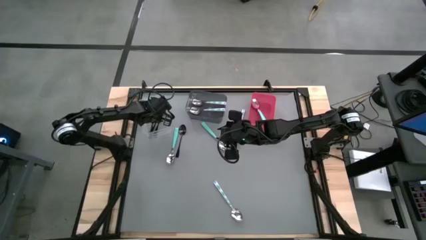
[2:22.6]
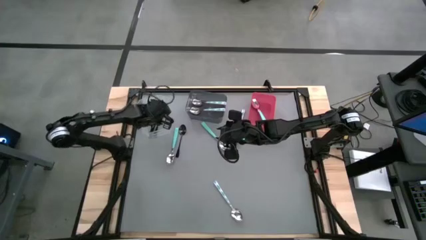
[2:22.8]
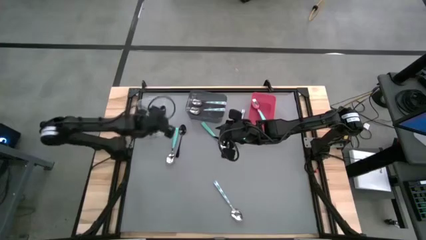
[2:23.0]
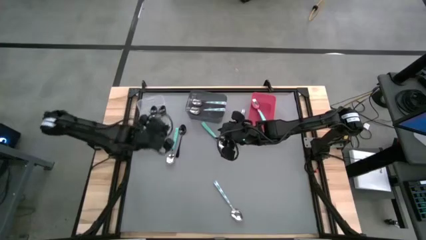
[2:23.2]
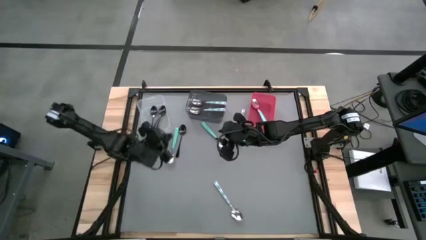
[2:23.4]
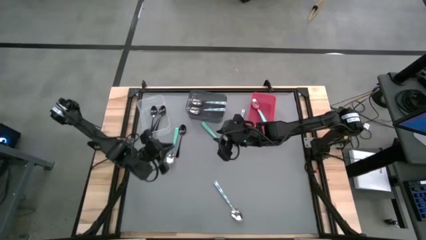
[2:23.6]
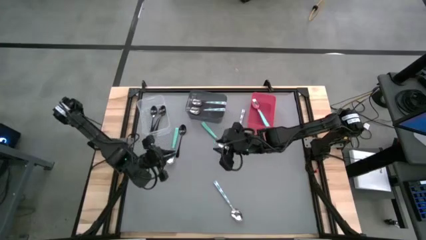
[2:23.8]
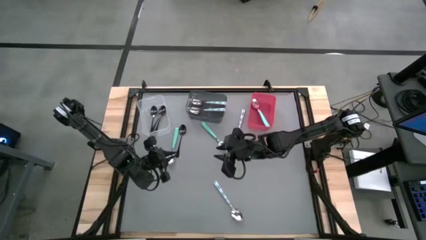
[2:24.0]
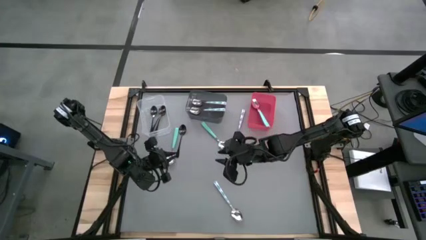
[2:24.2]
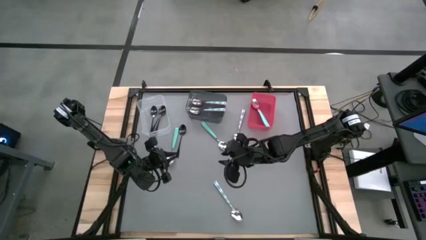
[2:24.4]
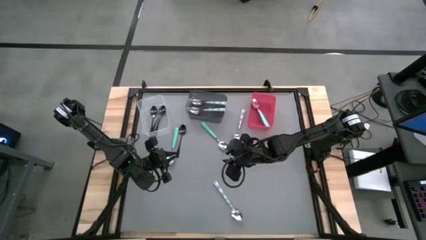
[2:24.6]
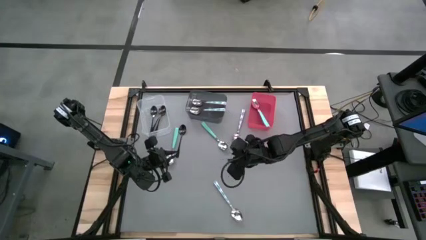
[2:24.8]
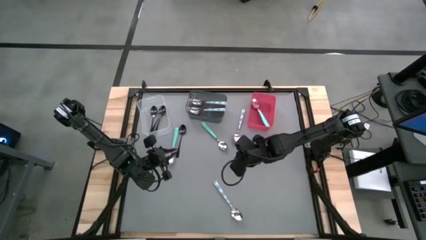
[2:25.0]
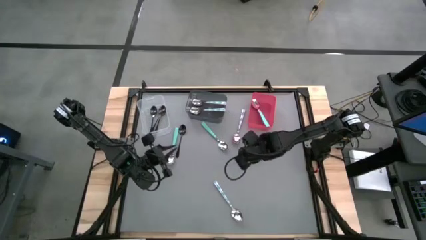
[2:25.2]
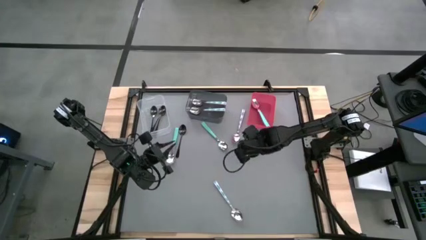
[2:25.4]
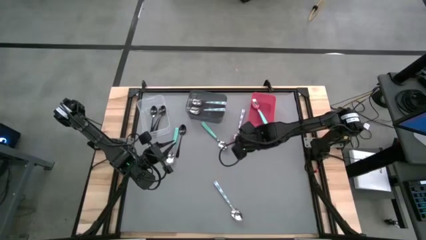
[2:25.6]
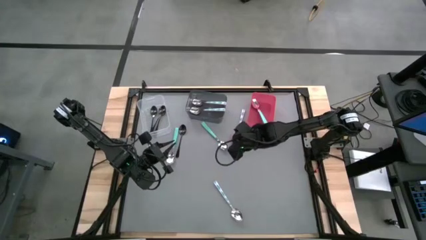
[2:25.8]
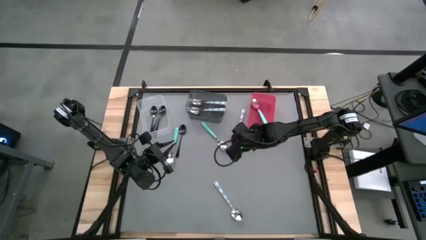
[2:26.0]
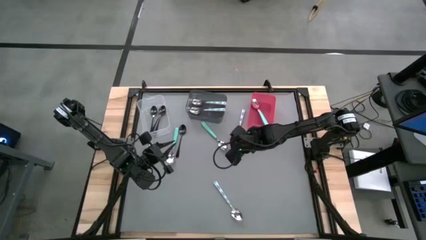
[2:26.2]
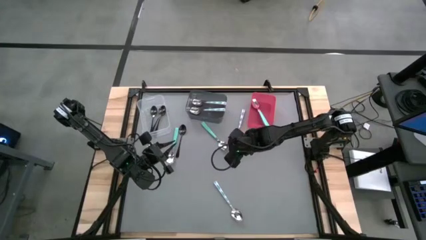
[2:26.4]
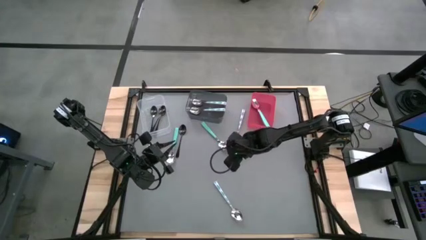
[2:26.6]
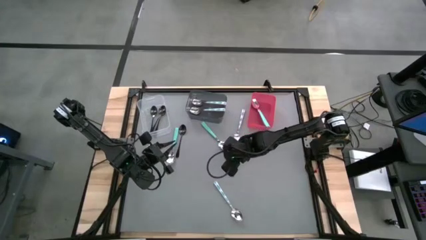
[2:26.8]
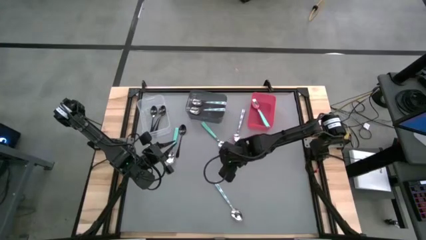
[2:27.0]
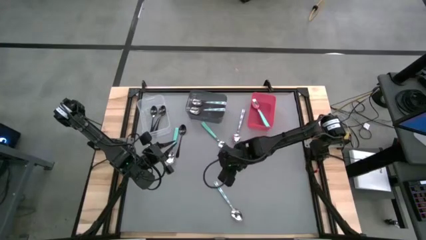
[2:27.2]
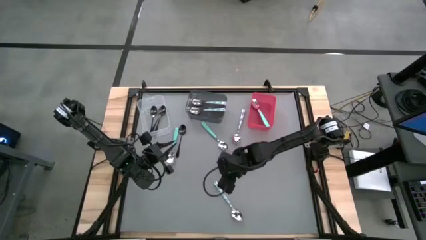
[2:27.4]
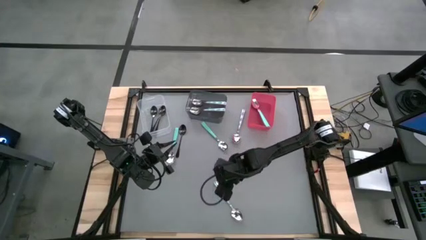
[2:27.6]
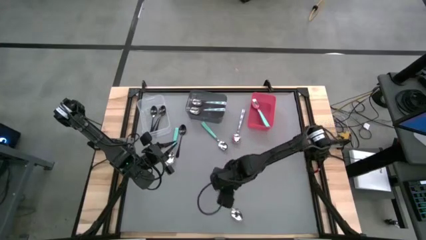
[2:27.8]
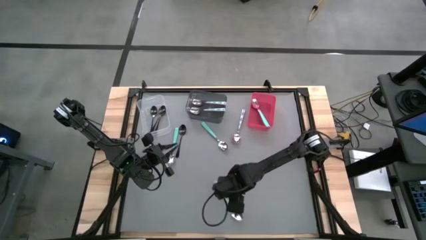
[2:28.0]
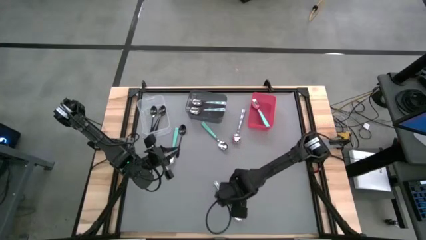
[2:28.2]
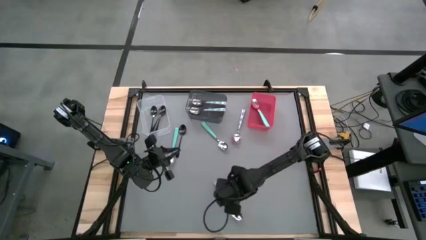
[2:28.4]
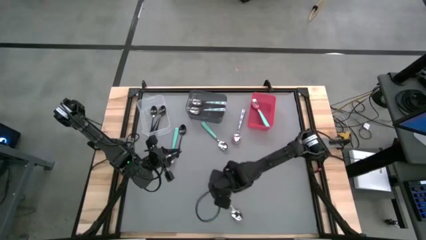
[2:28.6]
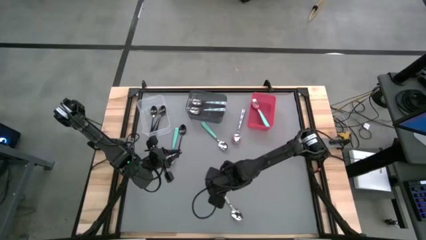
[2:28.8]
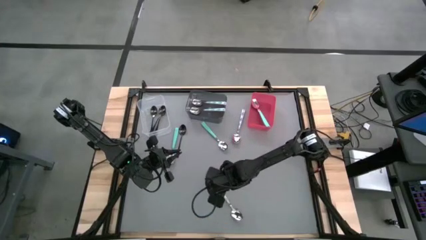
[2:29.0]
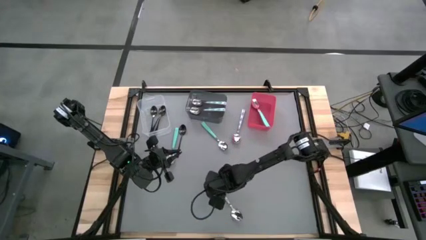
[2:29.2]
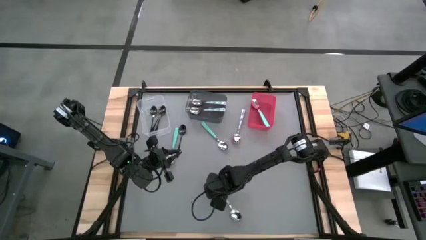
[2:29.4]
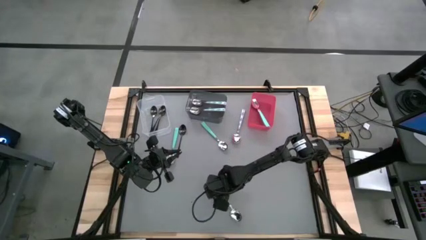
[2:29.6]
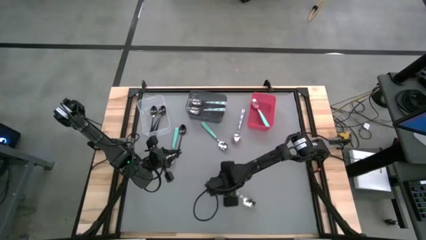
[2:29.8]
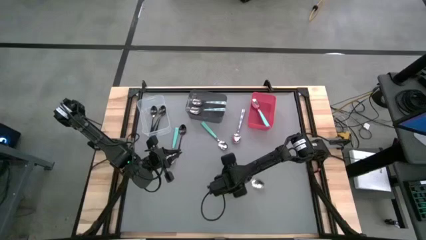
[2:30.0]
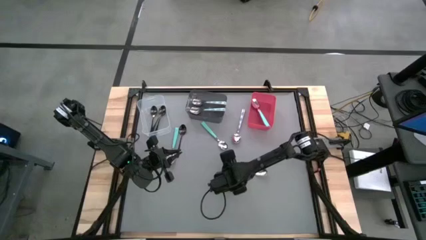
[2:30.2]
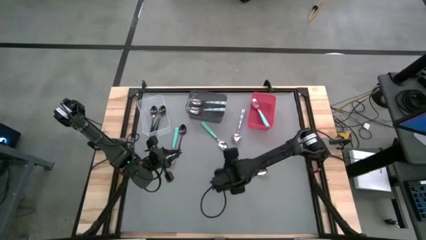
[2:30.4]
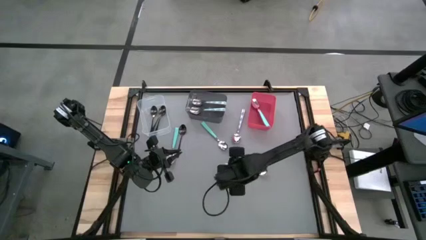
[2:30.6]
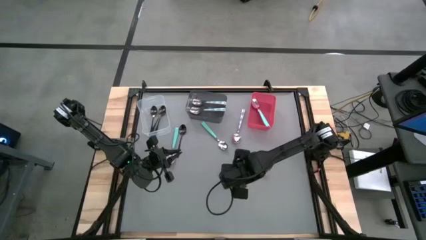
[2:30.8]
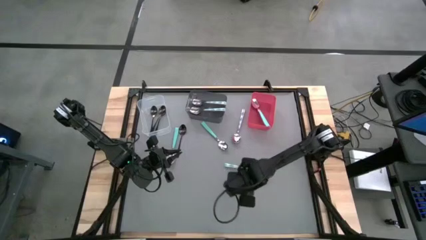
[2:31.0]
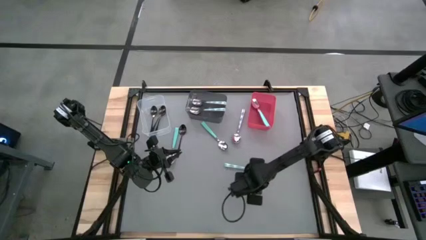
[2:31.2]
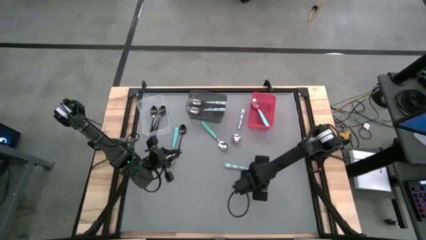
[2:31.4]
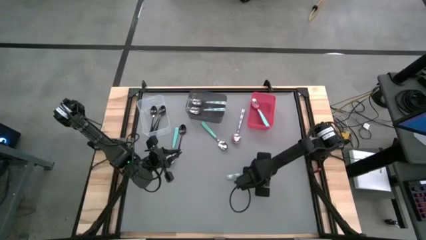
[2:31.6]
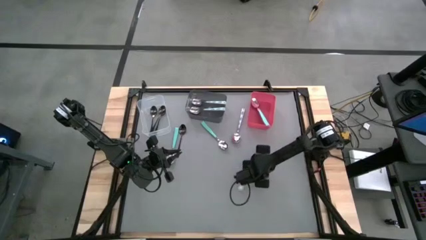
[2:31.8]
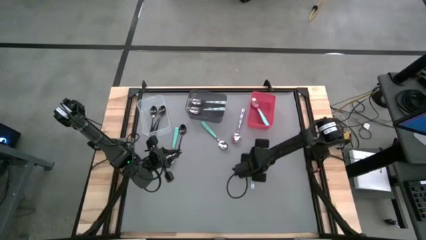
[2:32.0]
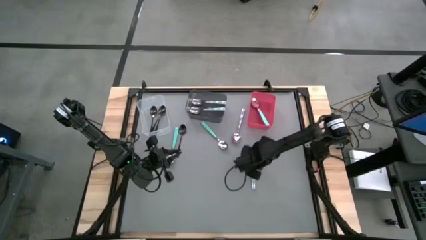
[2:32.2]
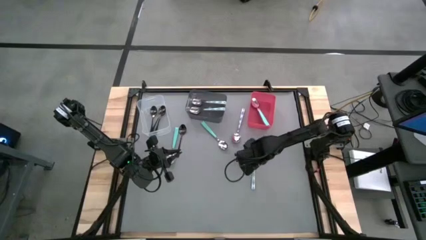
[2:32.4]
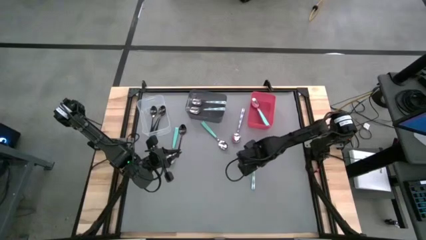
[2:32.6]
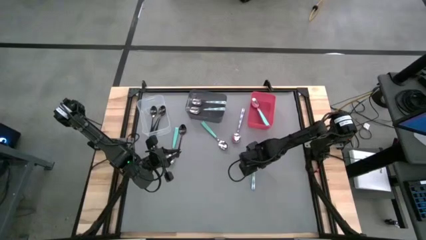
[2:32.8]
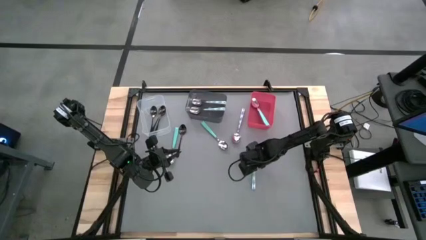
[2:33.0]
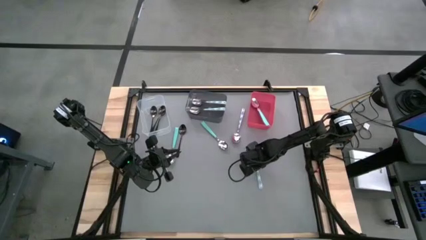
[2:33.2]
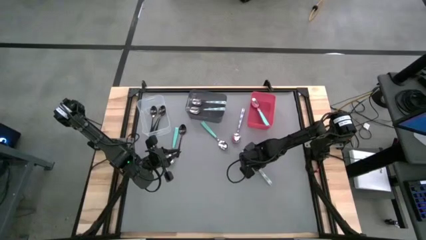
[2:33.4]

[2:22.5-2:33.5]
Task: Sort silverware by color (type)
Put the bottom blue patterned spoon into the black bin

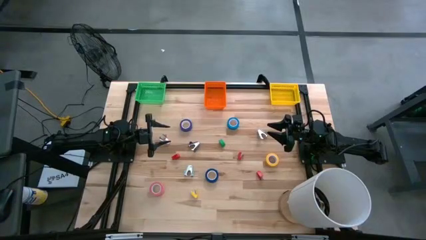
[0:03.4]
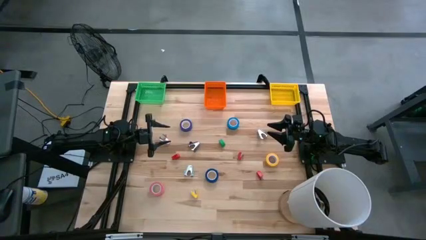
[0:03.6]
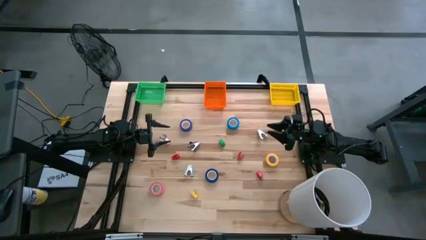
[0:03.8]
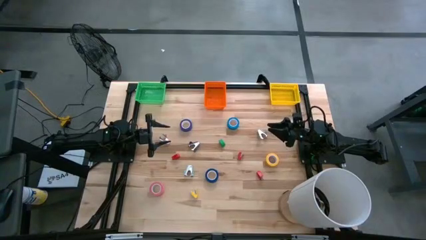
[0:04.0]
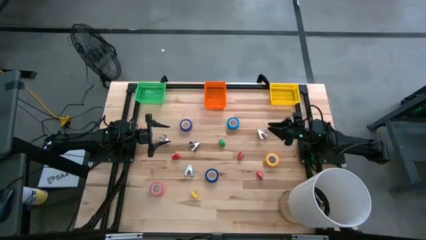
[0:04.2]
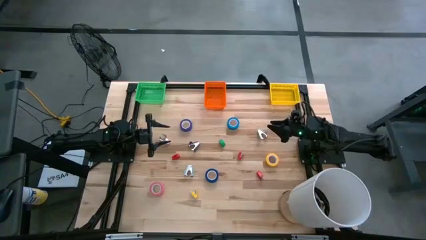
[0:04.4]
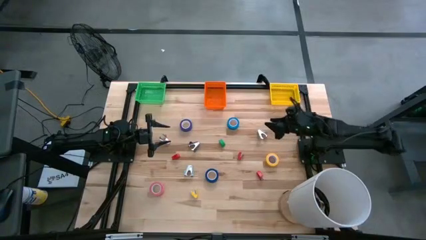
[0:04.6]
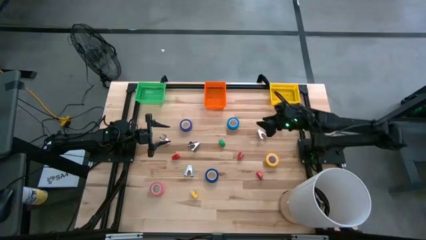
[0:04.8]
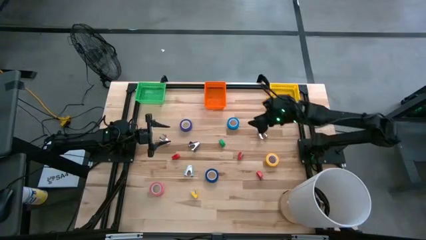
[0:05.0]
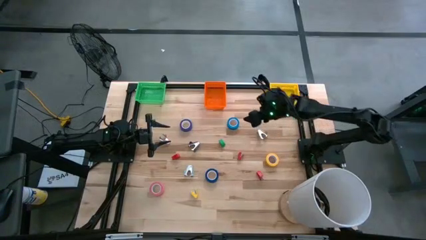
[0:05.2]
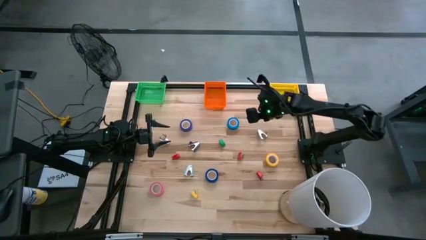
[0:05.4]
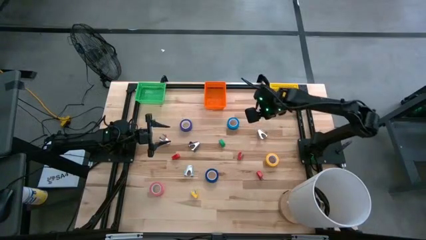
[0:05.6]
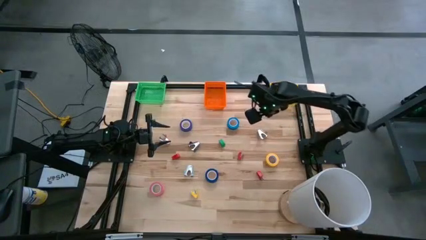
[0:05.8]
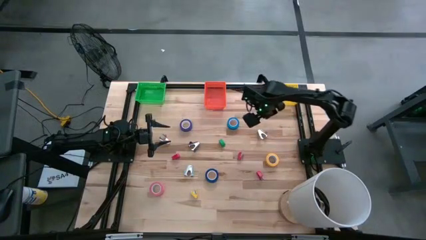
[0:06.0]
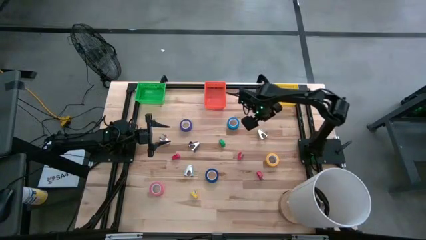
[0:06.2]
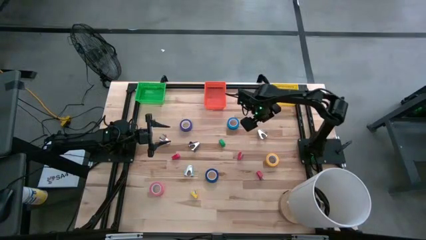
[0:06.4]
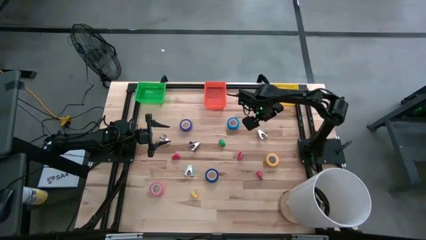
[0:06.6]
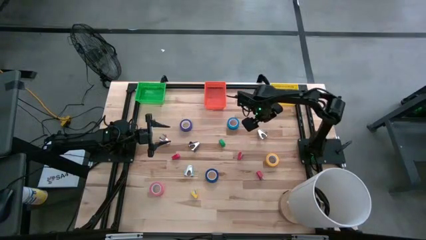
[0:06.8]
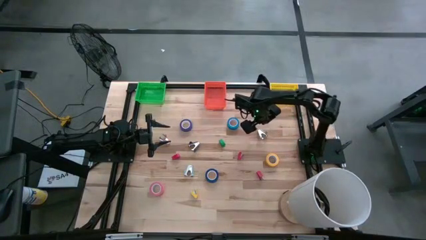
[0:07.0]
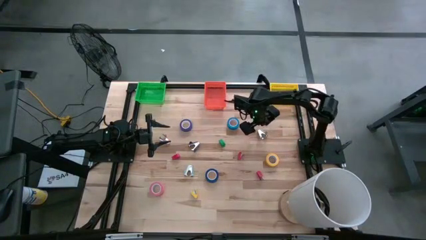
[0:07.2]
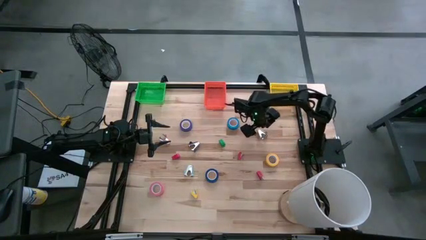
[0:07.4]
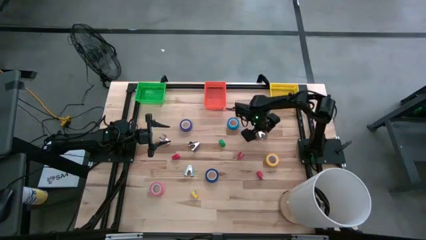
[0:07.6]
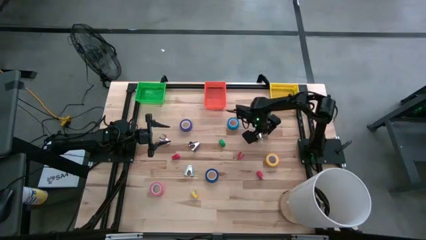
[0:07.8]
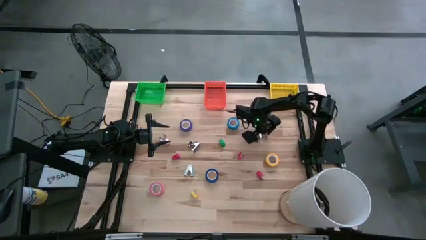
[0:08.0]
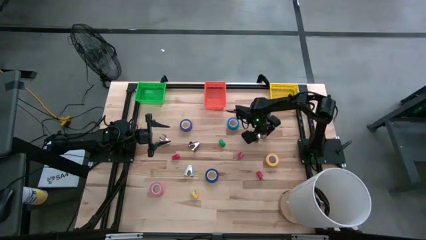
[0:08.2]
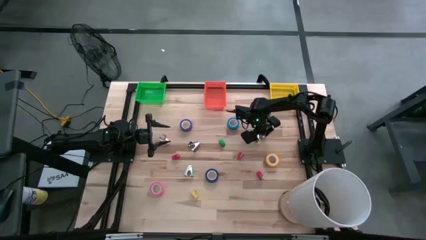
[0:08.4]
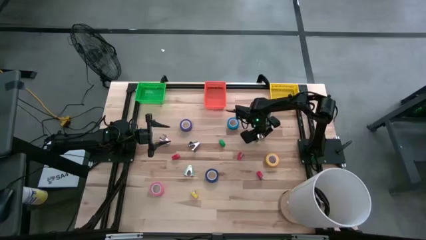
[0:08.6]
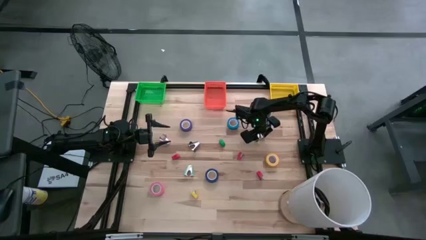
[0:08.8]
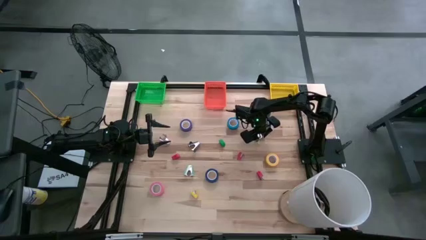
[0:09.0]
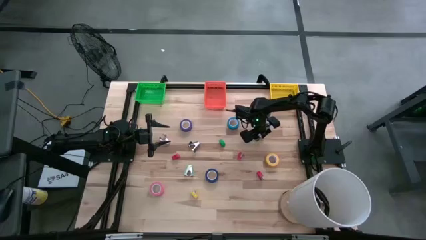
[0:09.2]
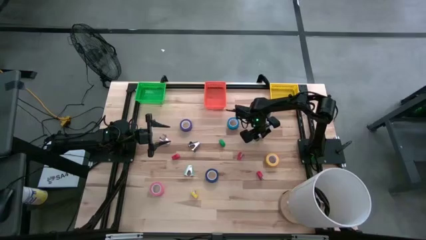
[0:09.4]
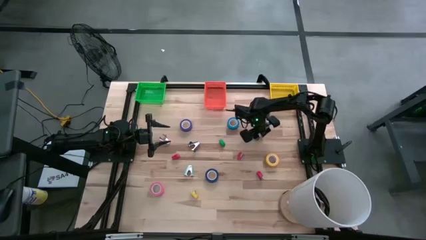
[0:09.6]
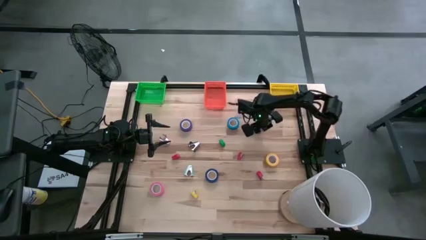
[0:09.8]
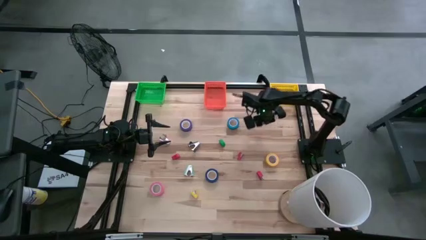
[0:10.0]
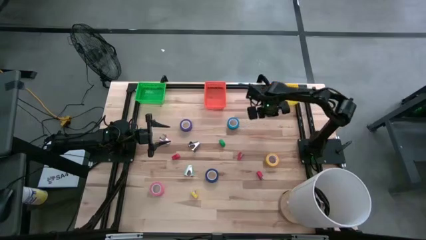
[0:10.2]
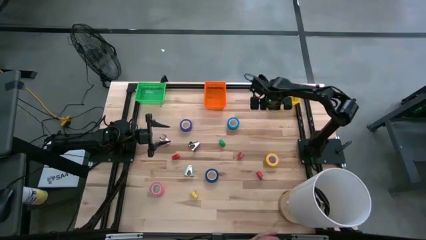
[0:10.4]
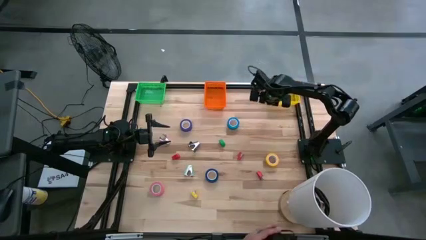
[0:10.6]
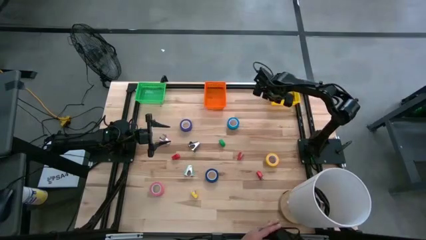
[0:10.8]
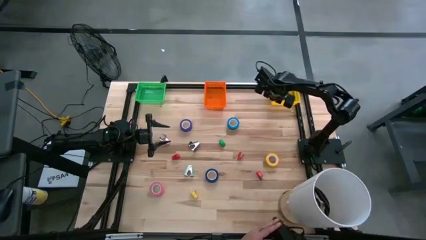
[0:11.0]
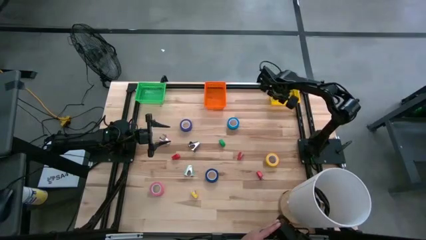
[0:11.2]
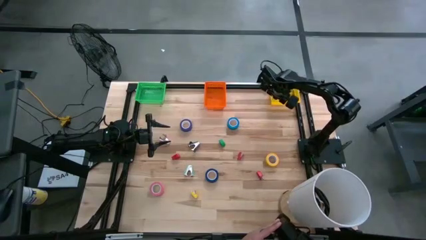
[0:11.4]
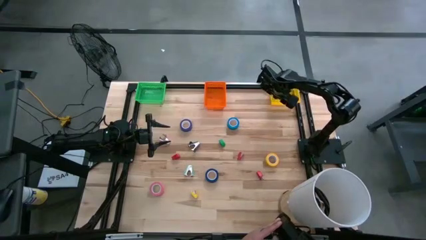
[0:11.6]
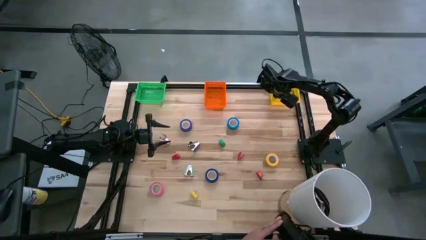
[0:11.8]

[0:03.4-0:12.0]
Task: Pick and place Stapler, Stapler remover, tape
Put the gray staple remover into the yellow bin
